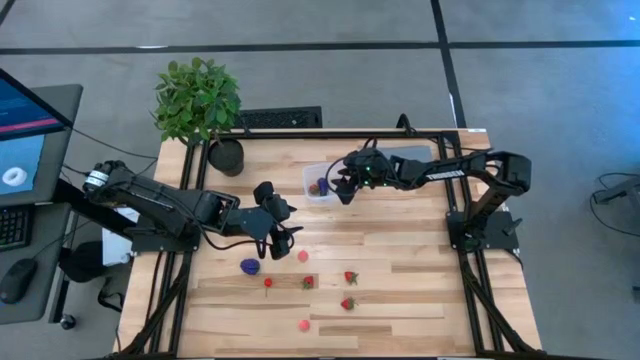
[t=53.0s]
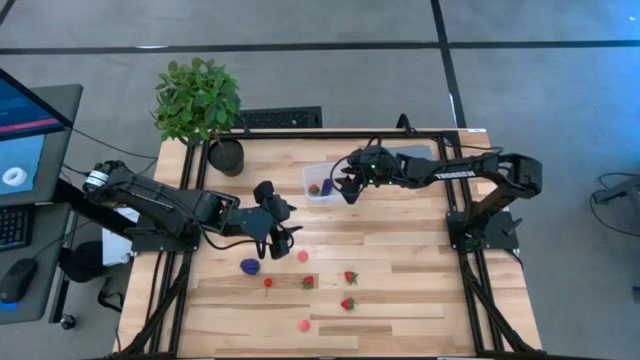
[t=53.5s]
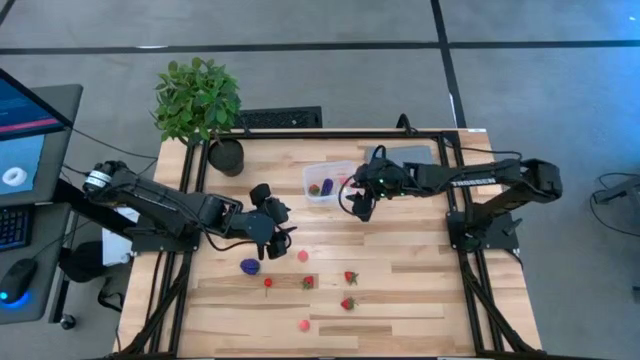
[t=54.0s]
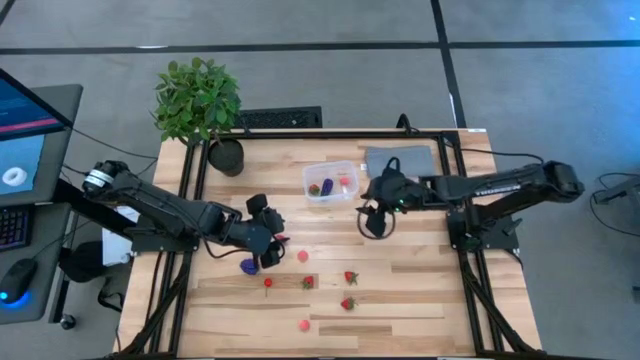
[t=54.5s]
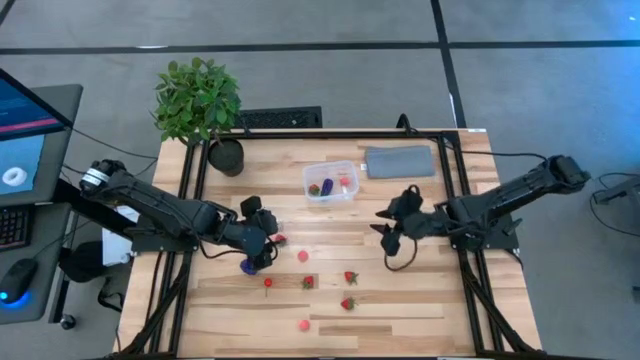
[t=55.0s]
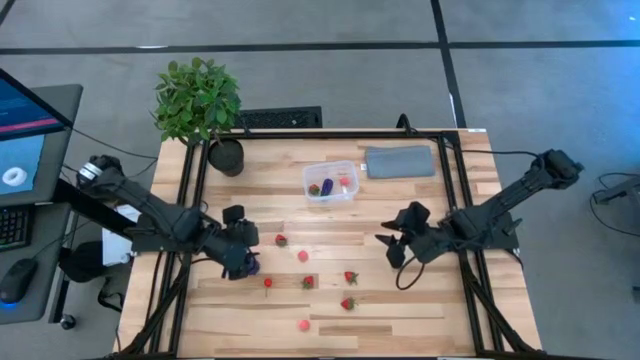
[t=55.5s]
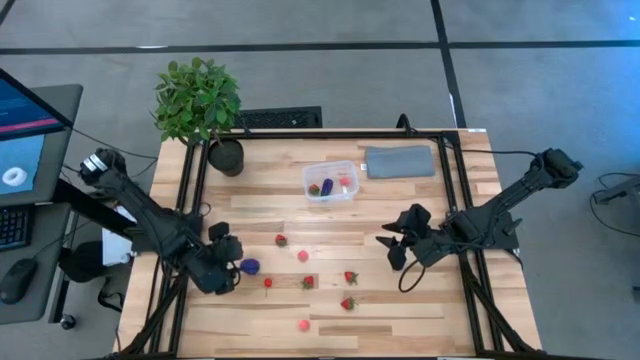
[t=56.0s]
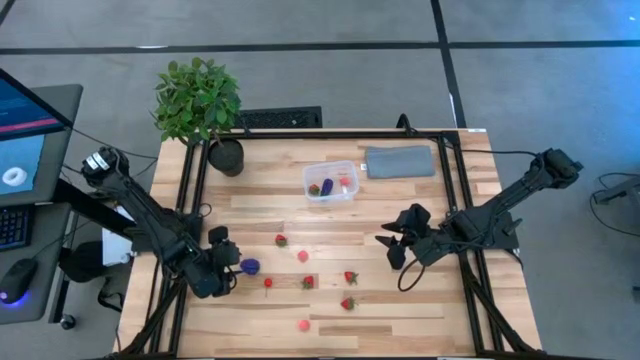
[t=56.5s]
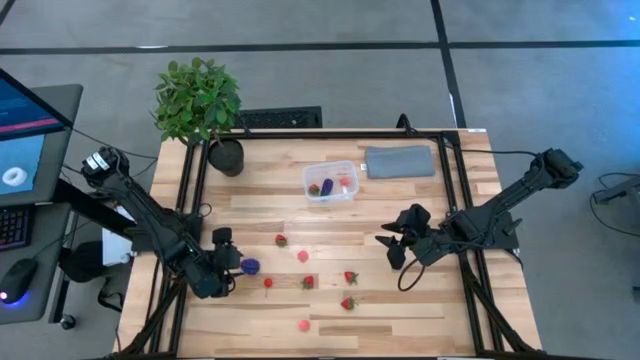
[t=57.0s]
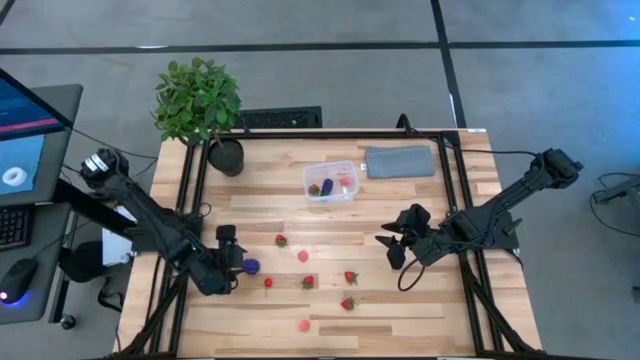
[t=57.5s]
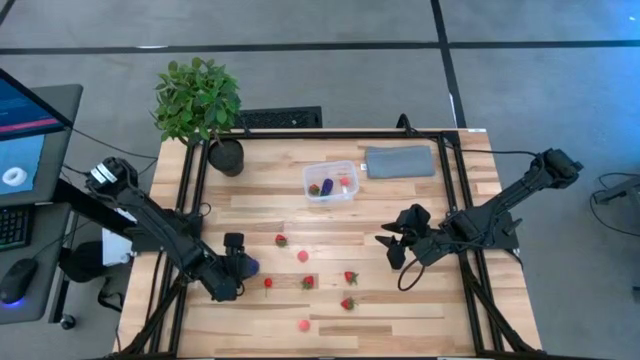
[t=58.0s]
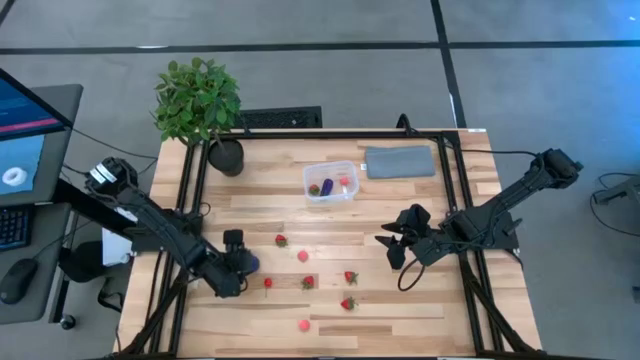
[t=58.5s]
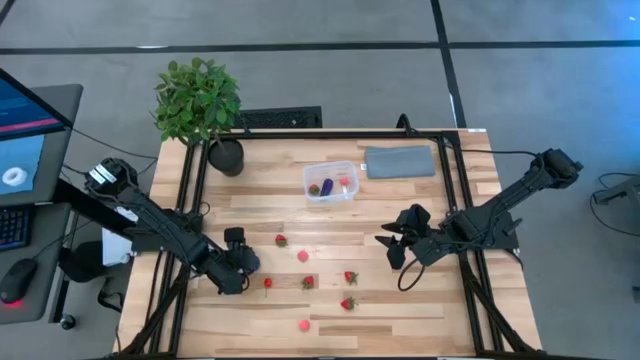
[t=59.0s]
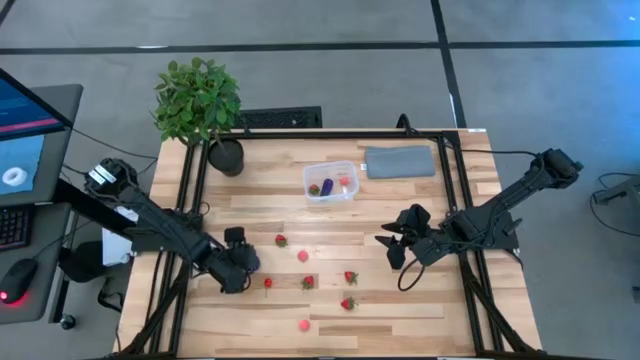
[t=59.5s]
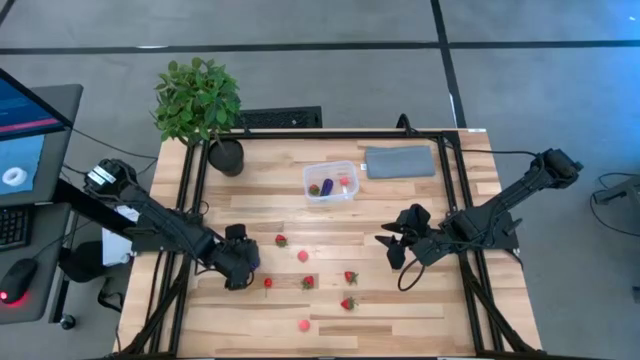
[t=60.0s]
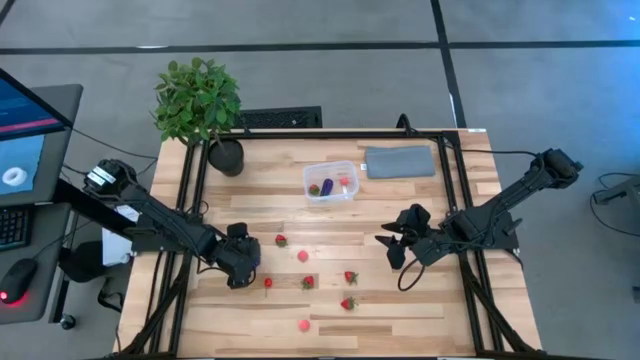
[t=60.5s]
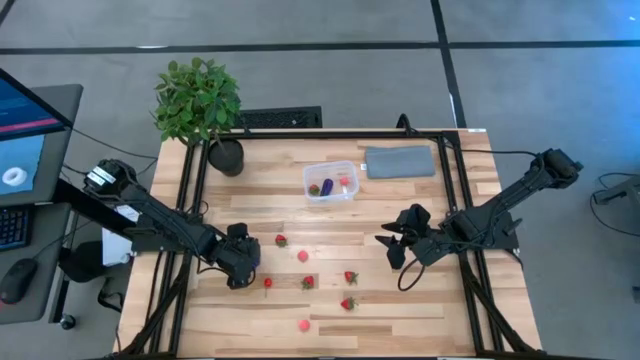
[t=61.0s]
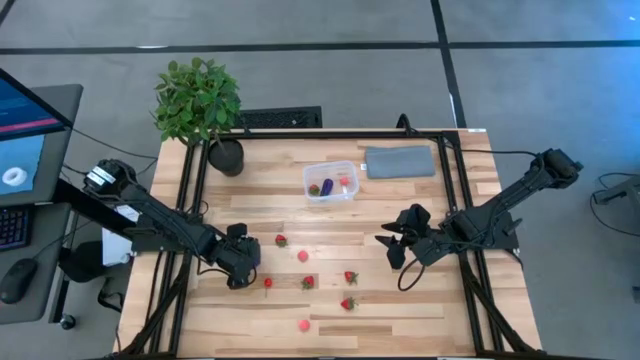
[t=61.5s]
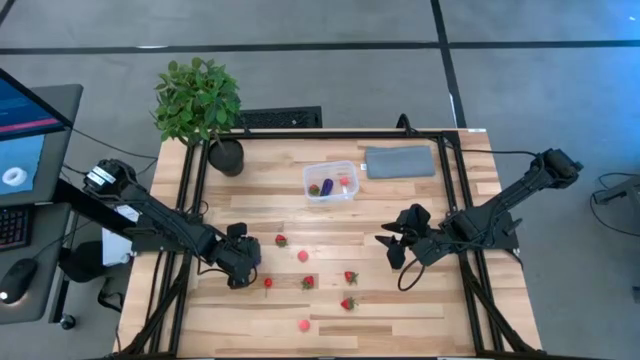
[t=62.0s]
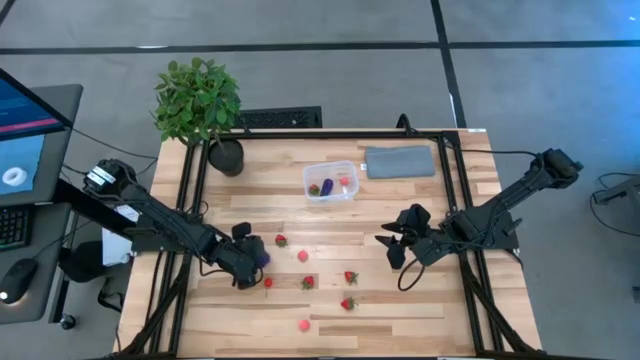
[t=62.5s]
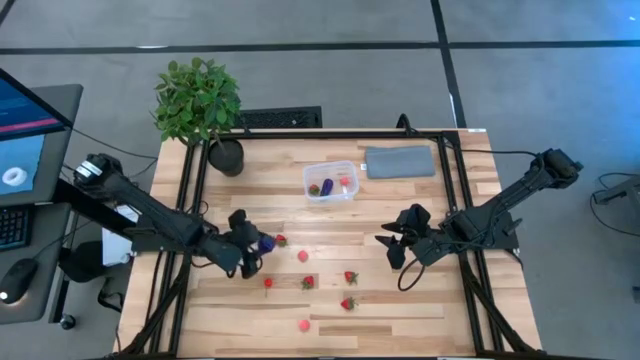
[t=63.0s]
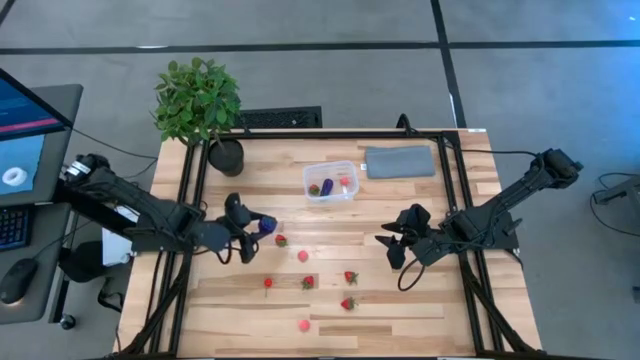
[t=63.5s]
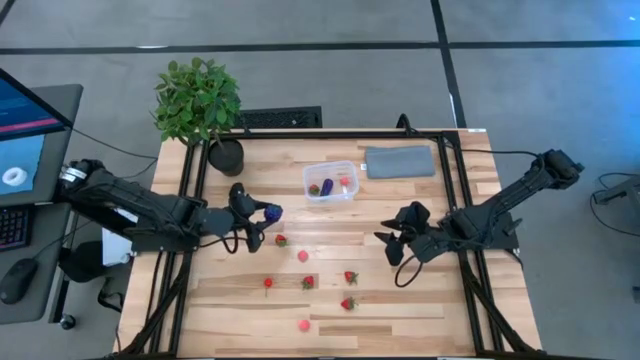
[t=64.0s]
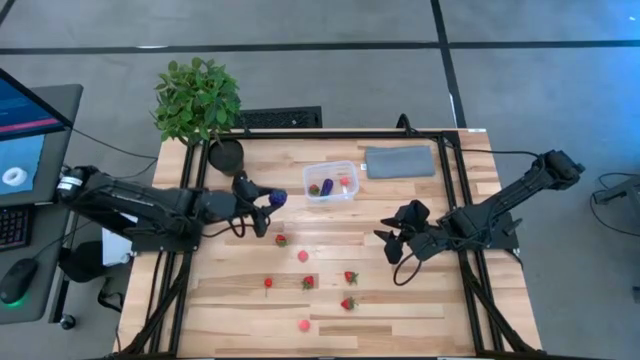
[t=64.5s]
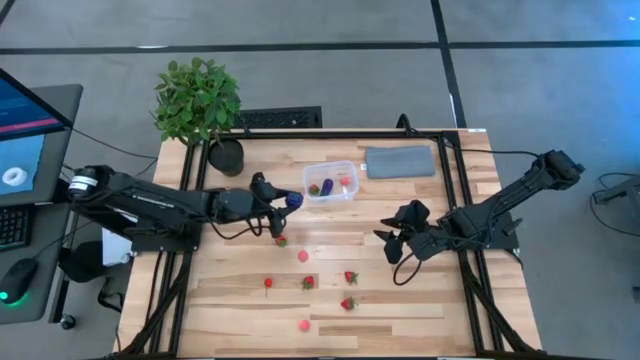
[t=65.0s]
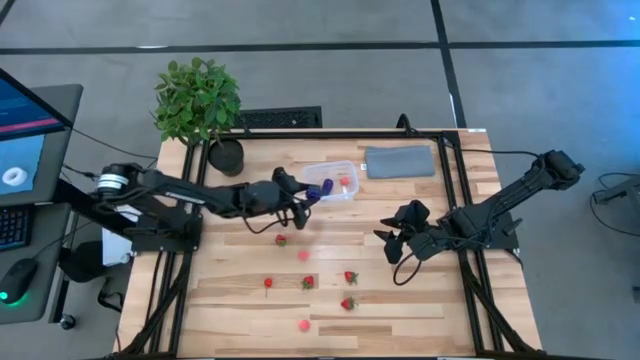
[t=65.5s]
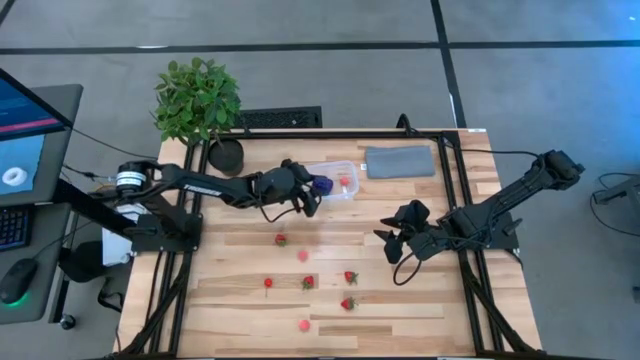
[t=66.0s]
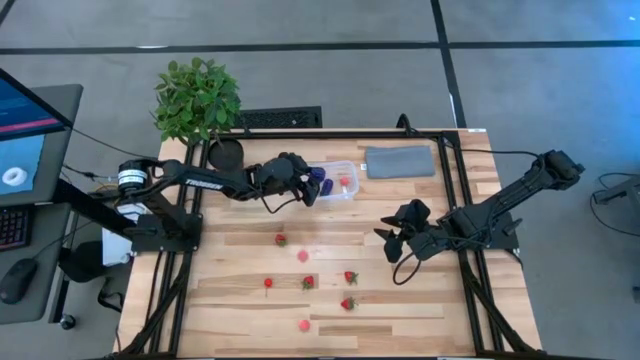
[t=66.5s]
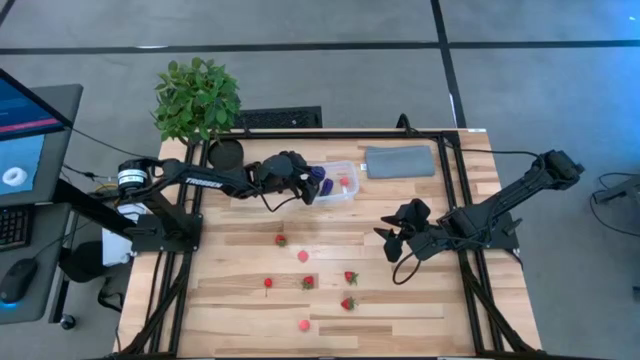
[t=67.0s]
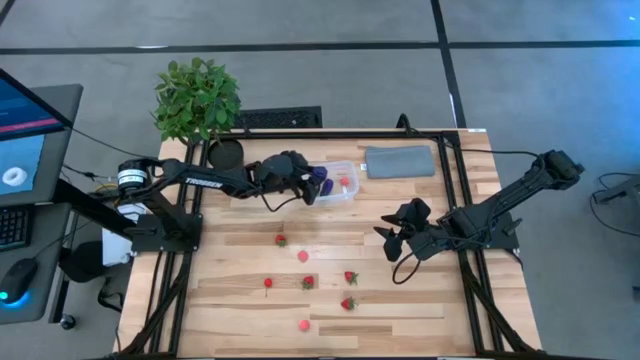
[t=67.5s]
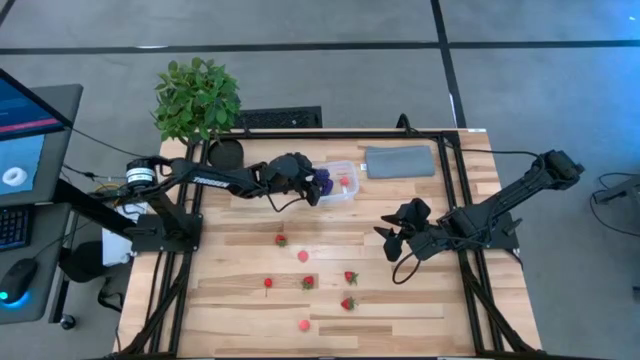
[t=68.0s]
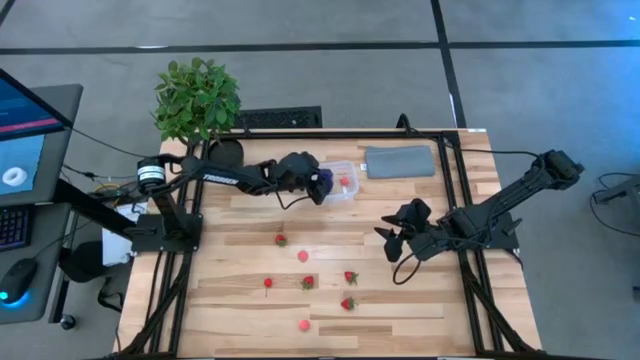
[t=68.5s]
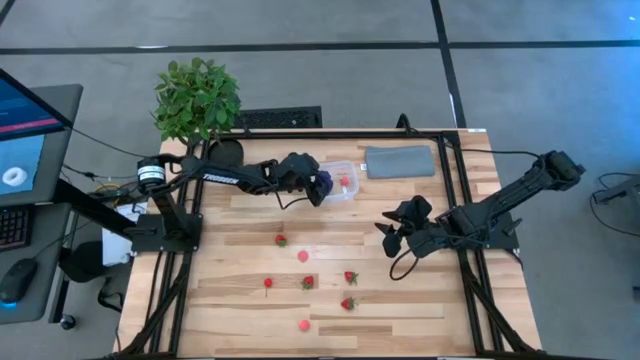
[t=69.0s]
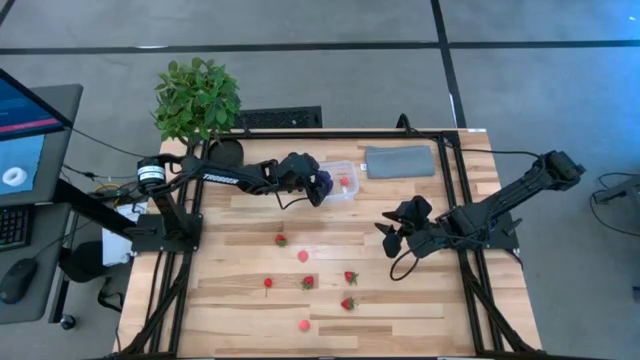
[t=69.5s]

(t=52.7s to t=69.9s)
Task: Pick and placing Produce into tupperware
Put the grape into the container
